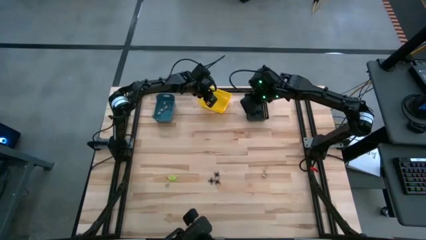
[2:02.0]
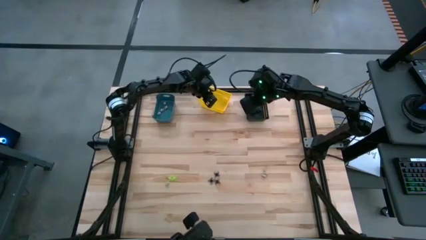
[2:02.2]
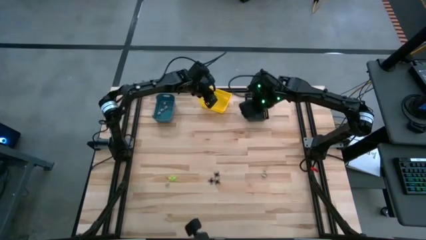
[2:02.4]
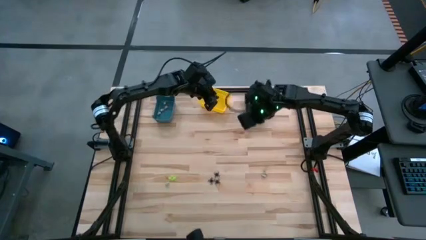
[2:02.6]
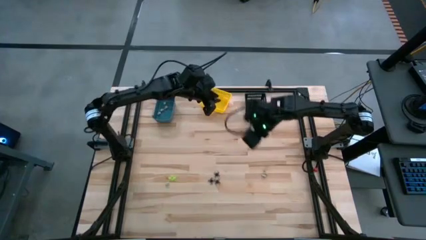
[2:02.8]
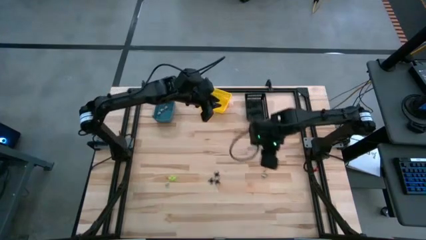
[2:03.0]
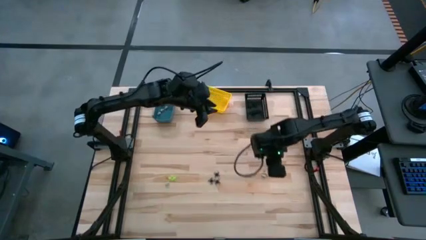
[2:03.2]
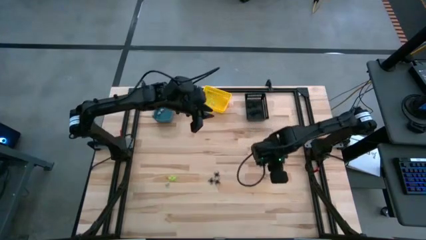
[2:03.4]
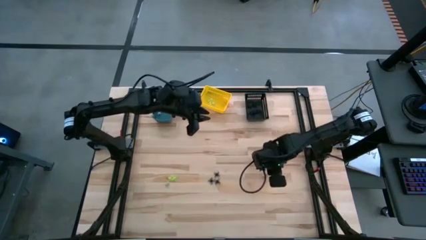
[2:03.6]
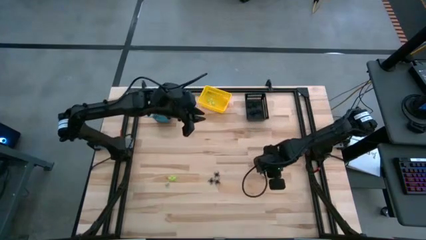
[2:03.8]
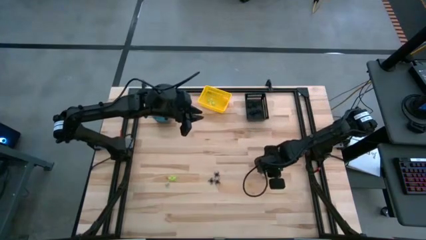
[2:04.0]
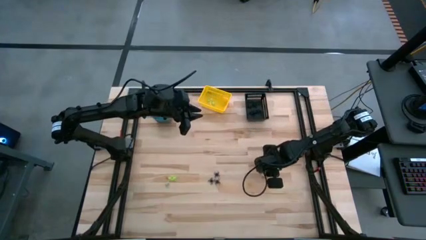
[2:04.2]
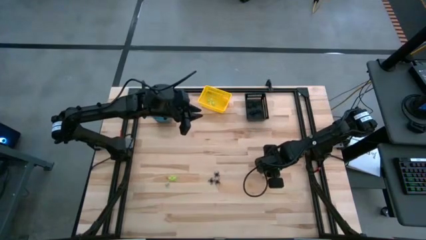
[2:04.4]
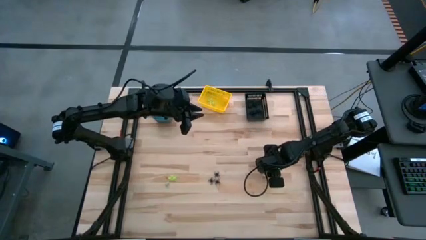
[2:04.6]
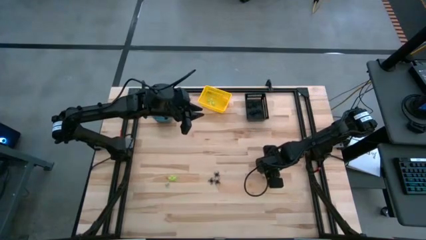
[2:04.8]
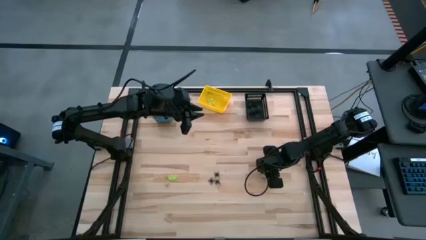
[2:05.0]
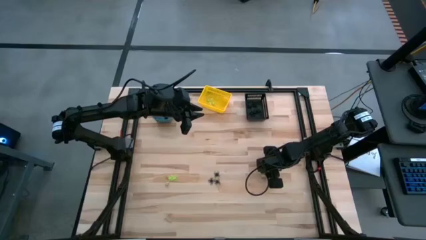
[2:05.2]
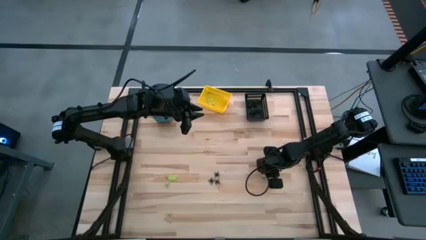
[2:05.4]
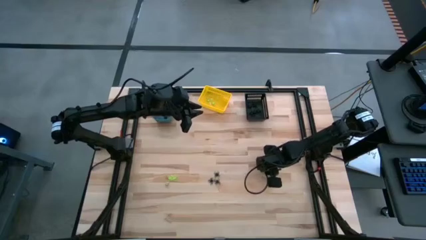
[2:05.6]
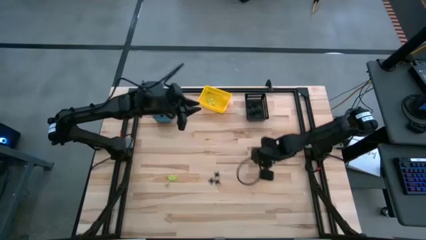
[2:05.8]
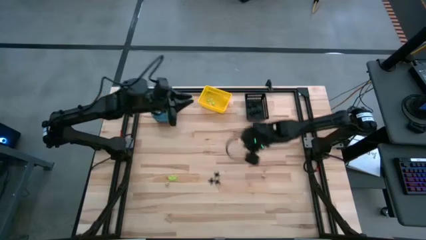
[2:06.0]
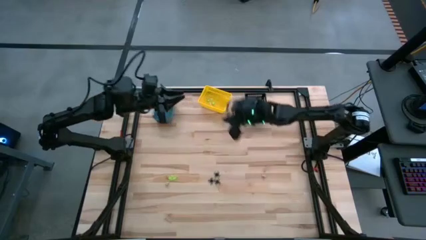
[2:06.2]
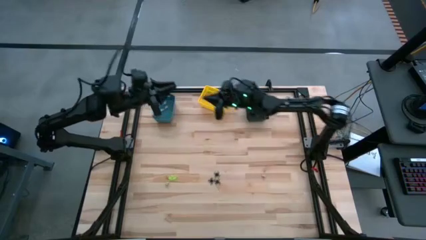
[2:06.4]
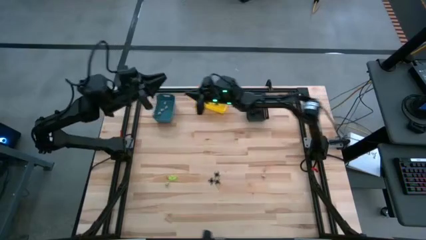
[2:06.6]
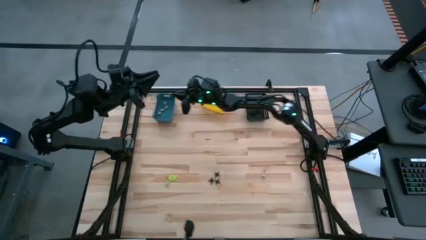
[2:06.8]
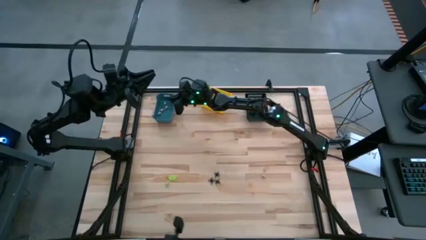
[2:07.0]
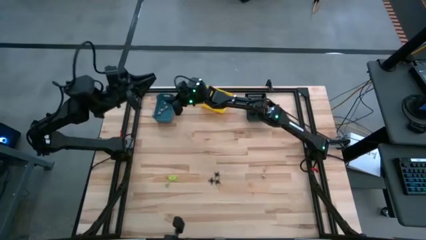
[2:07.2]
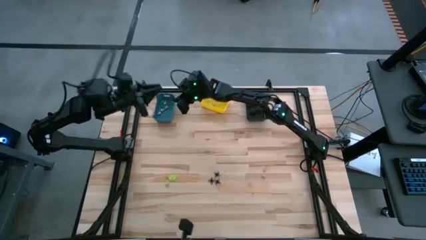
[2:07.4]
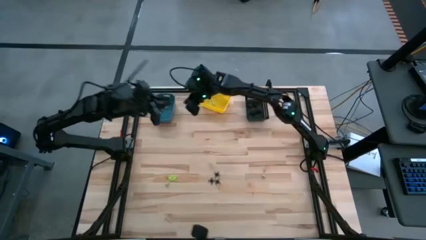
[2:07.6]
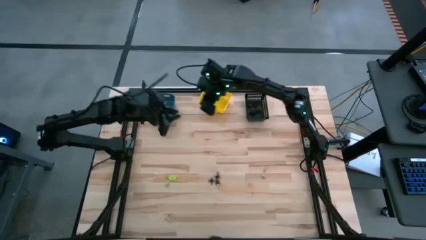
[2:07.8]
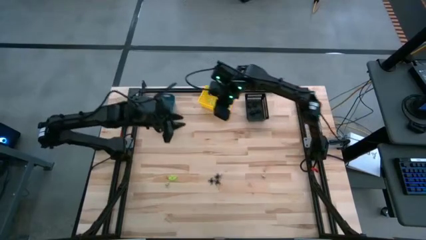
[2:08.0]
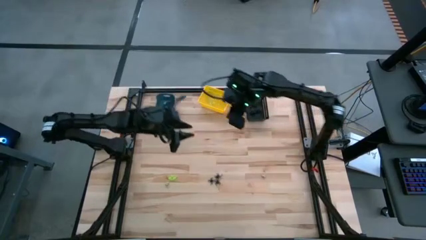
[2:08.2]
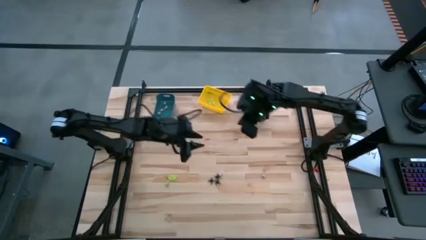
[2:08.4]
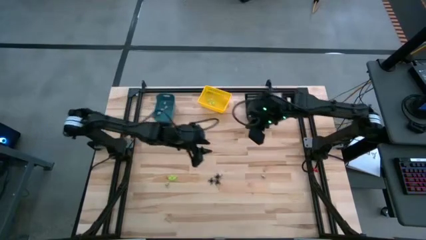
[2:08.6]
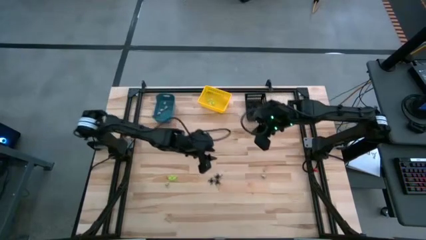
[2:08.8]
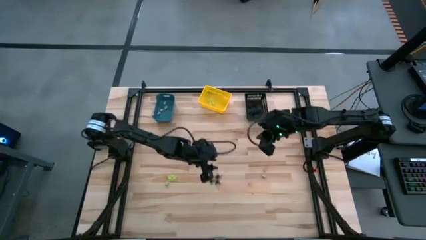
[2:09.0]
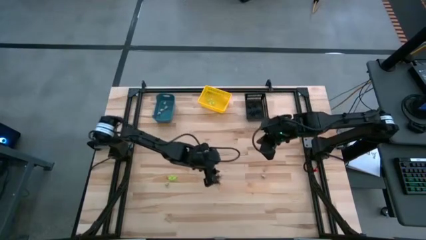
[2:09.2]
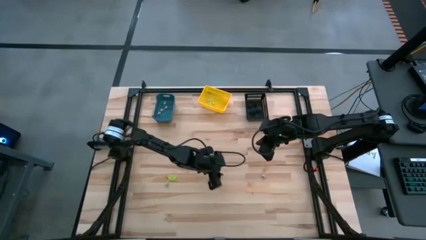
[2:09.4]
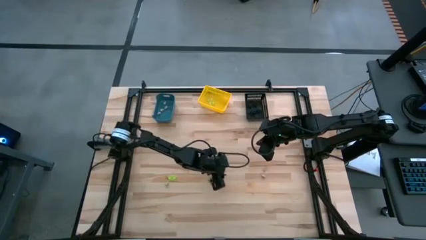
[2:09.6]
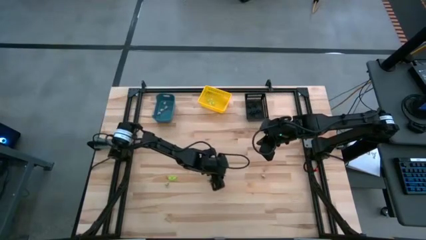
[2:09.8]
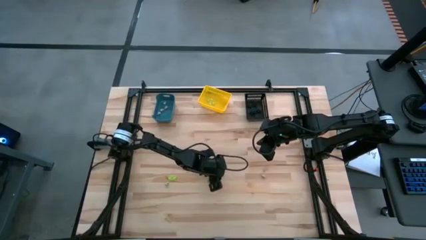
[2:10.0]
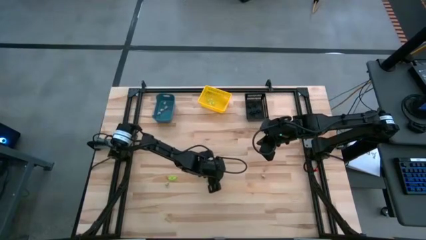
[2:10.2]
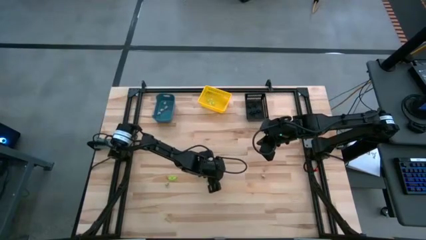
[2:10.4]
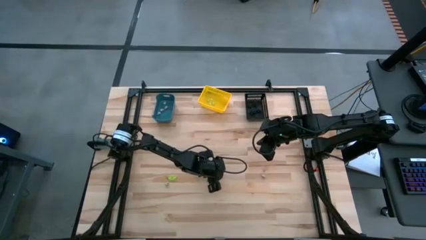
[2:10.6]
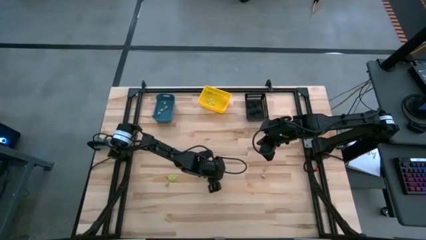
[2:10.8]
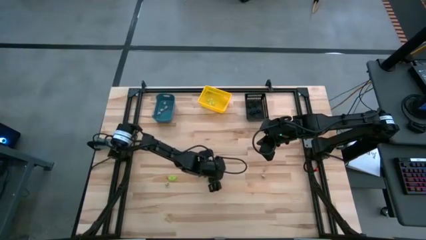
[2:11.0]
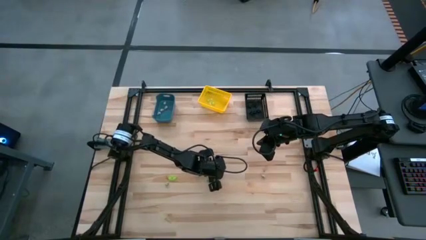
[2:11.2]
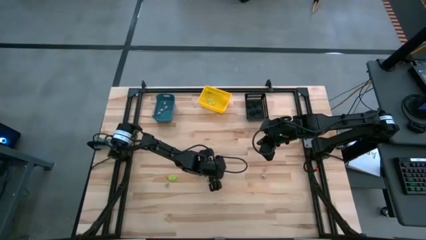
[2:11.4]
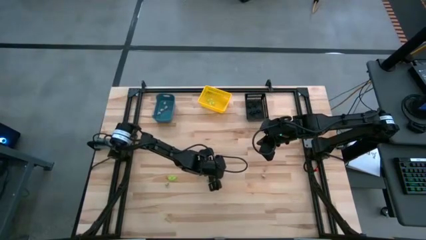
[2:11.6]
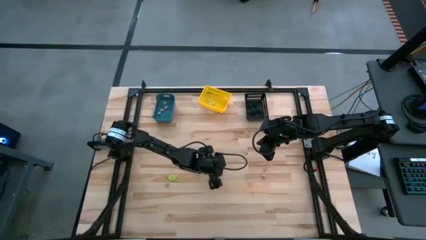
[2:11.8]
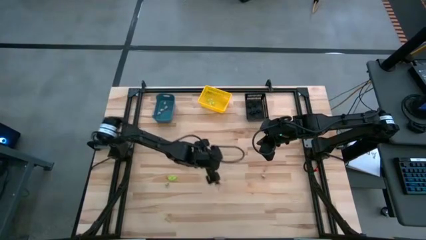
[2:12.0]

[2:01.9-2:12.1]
Task: Sort Halloween decoration
Put the gray skull toy into the blue bin

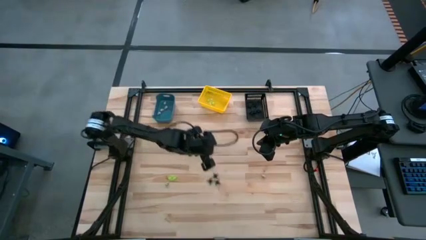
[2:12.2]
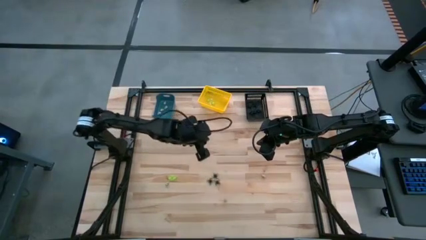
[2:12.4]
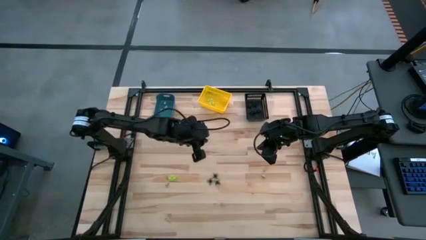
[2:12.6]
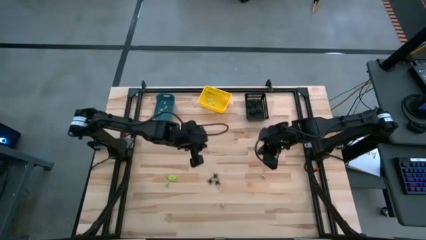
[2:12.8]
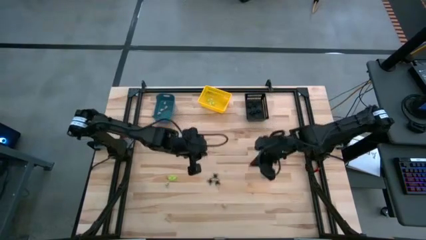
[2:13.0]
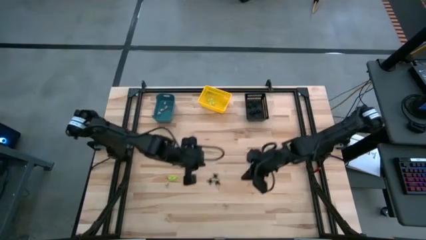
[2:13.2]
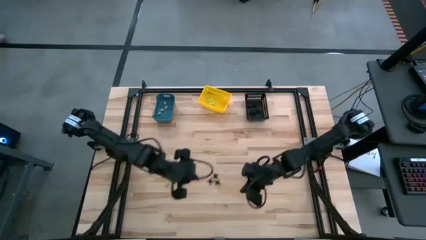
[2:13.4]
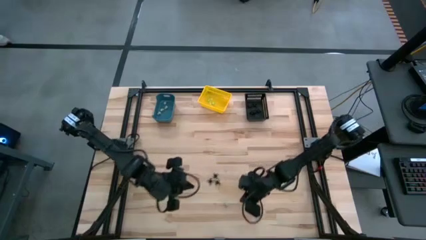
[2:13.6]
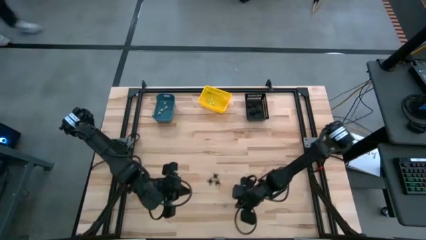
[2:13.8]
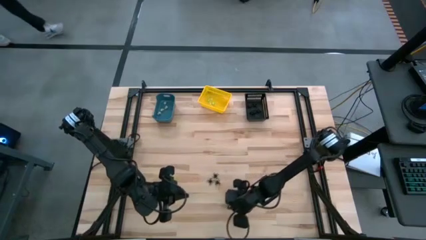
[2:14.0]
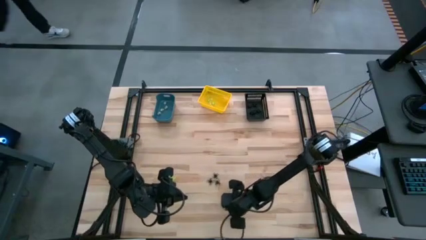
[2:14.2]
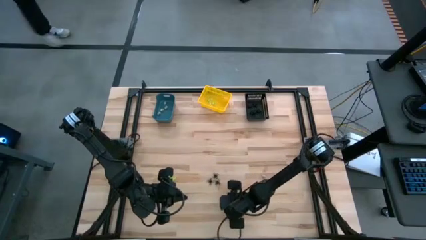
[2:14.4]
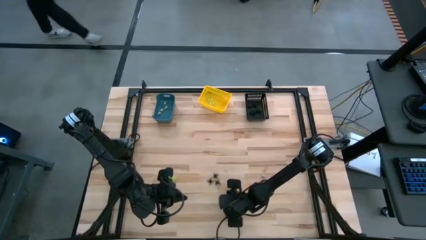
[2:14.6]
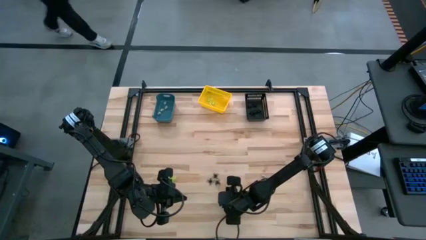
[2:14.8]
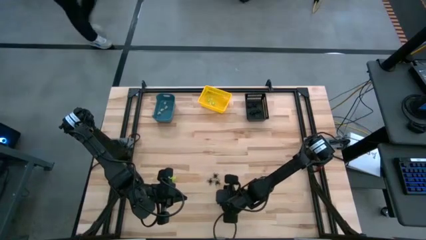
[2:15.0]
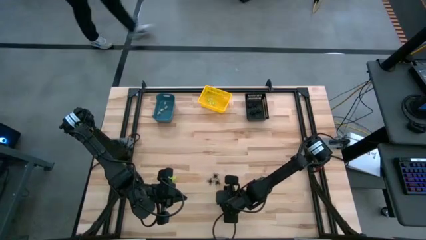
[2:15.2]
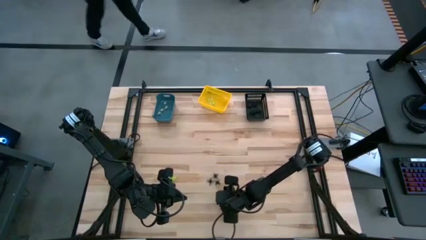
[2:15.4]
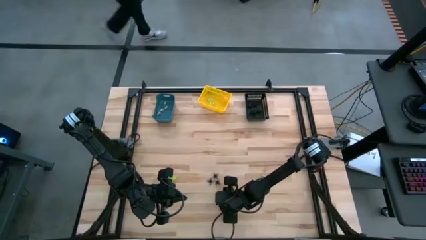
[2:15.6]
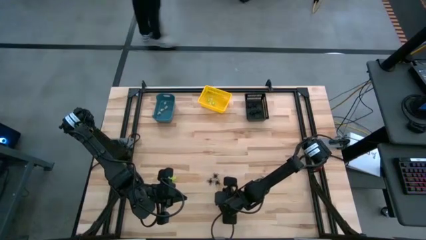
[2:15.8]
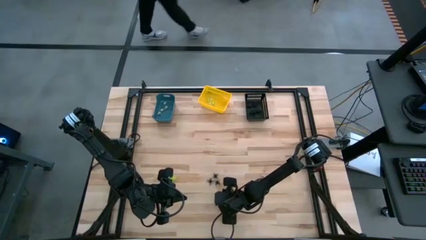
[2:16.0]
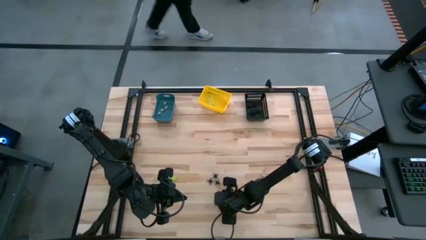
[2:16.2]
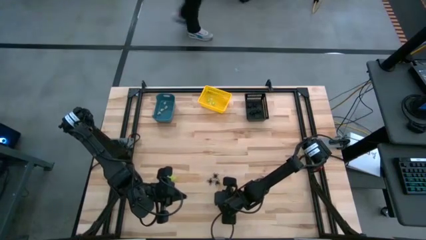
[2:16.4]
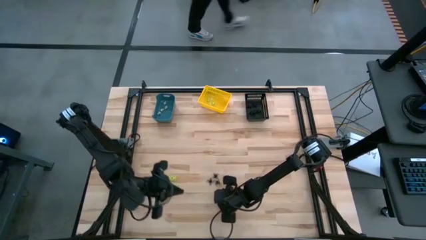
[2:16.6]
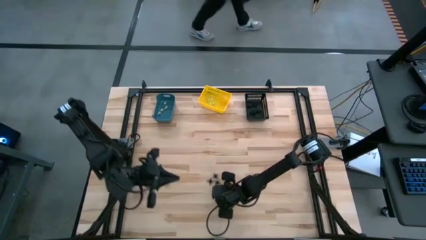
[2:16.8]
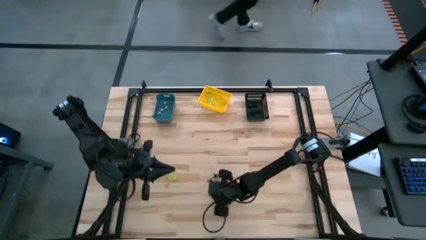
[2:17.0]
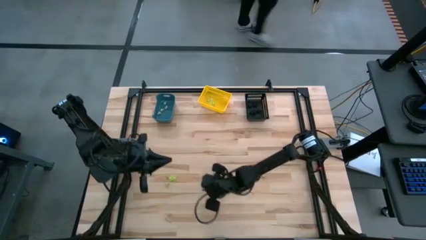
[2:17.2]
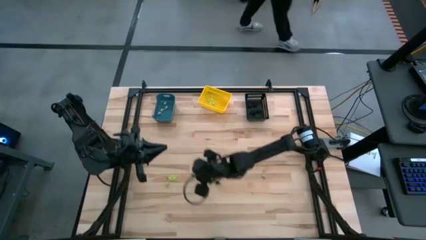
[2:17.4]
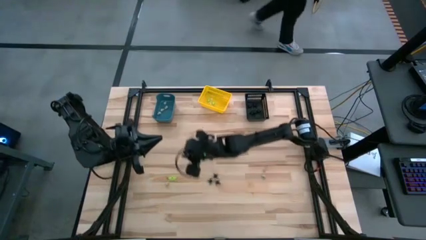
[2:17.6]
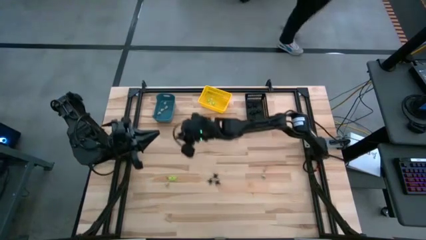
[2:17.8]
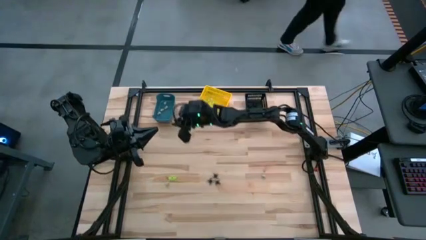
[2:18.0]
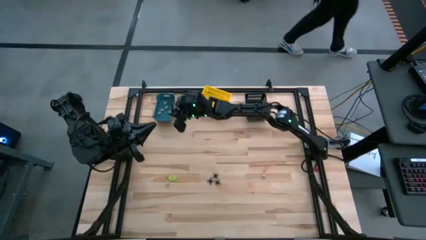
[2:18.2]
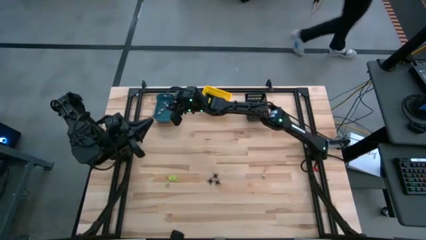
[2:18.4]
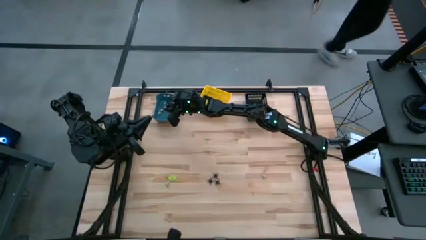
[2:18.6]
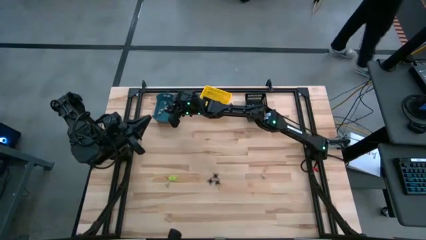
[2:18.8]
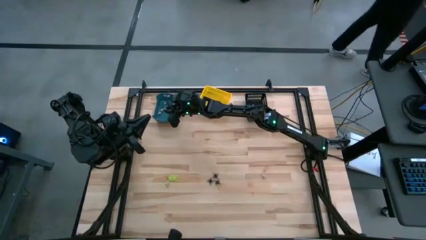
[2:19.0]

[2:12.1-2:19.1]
Put the gray skull toy into the blue bin
